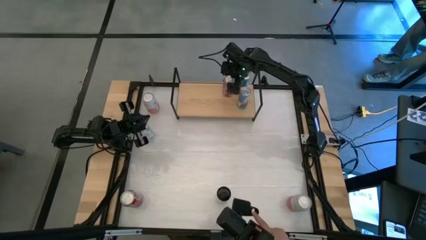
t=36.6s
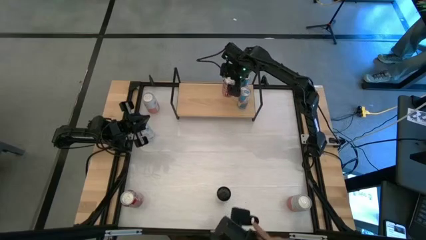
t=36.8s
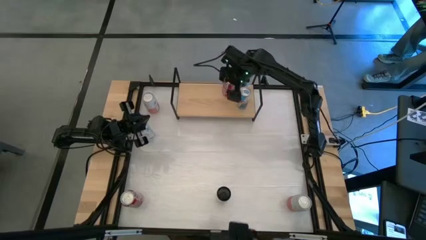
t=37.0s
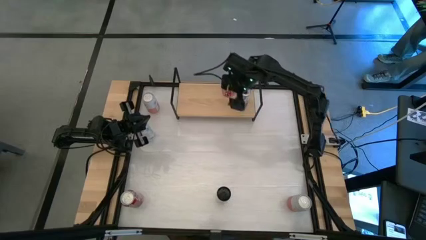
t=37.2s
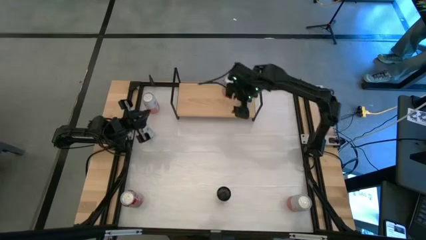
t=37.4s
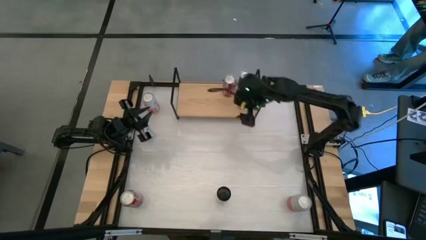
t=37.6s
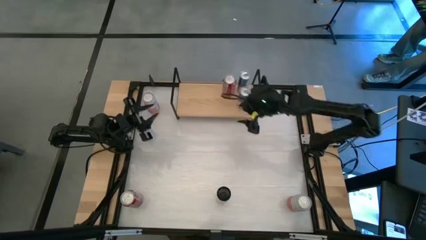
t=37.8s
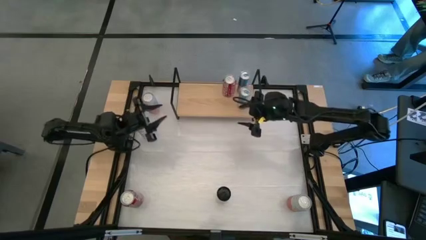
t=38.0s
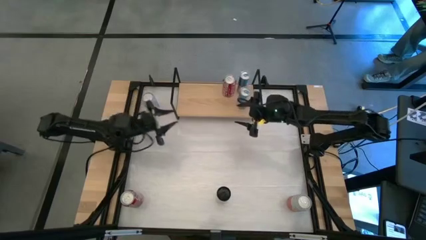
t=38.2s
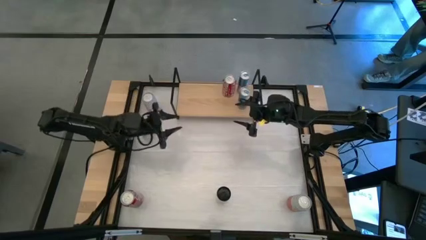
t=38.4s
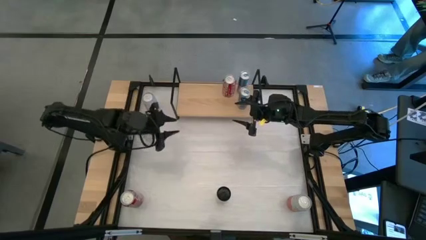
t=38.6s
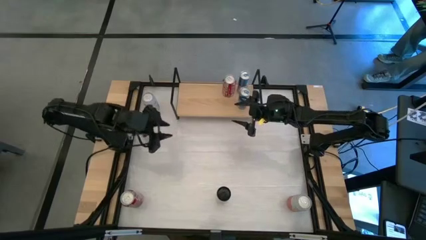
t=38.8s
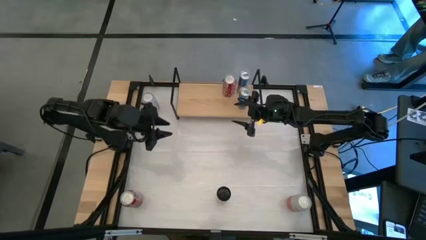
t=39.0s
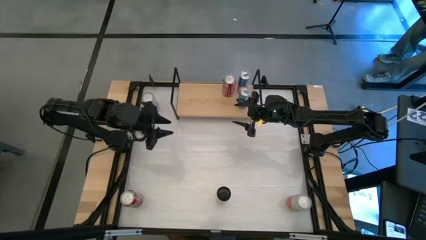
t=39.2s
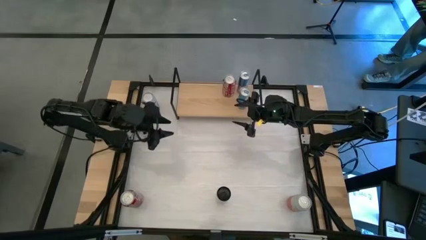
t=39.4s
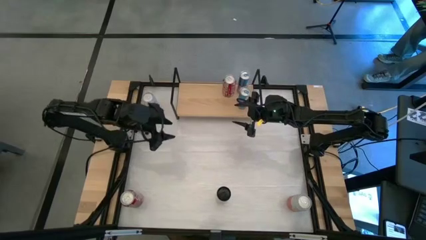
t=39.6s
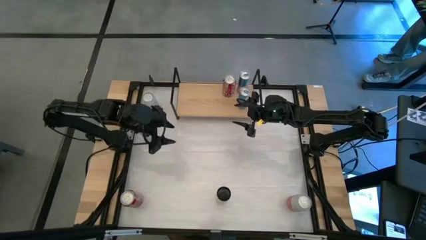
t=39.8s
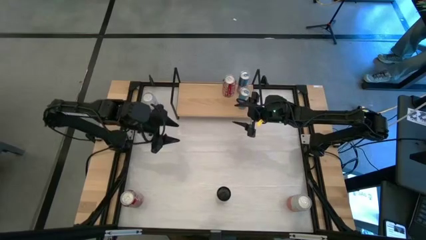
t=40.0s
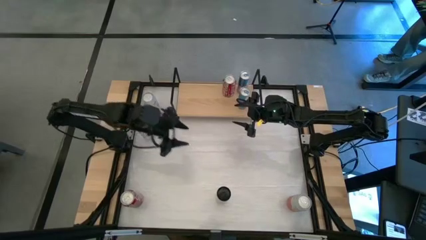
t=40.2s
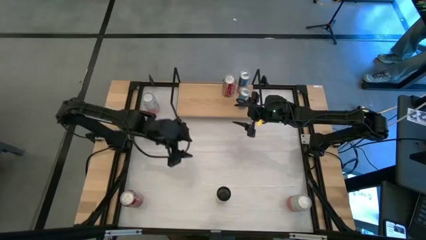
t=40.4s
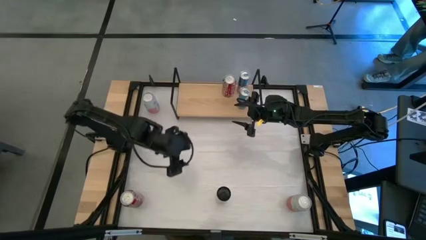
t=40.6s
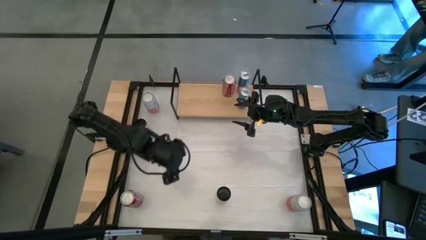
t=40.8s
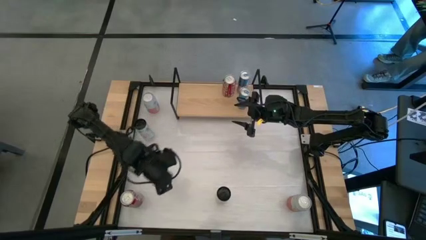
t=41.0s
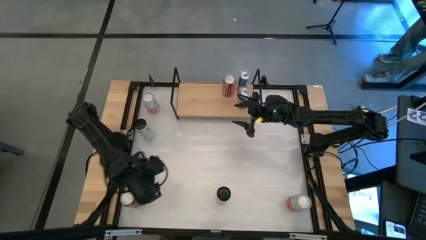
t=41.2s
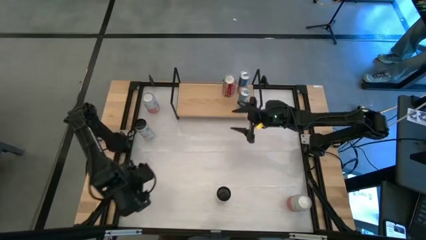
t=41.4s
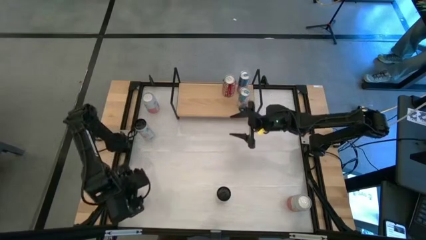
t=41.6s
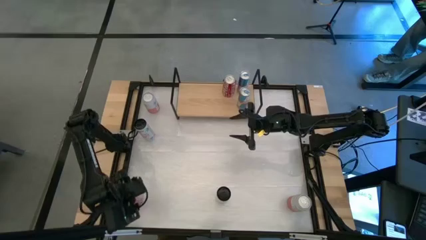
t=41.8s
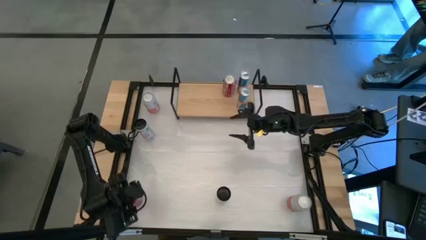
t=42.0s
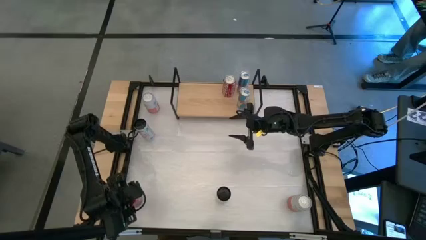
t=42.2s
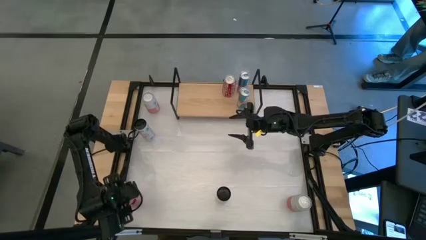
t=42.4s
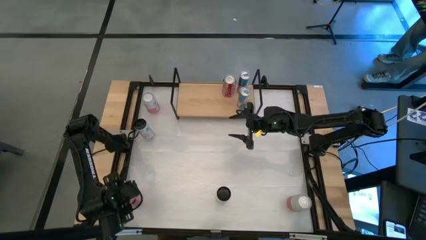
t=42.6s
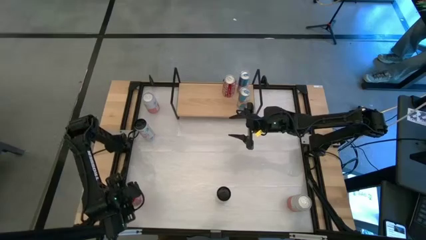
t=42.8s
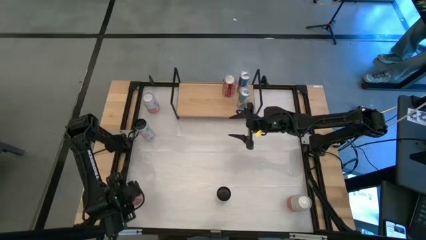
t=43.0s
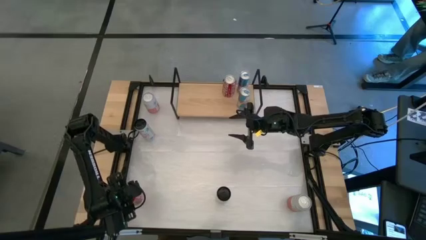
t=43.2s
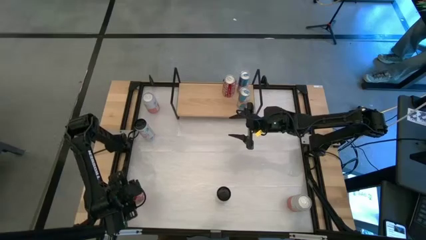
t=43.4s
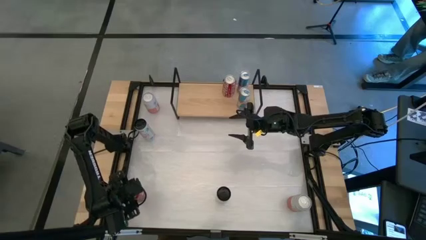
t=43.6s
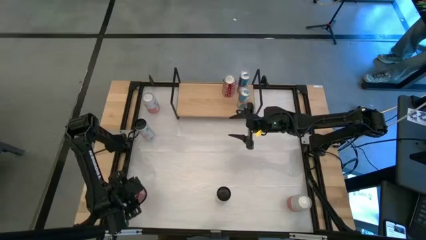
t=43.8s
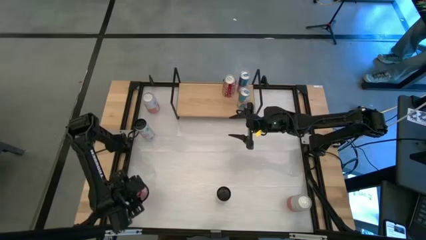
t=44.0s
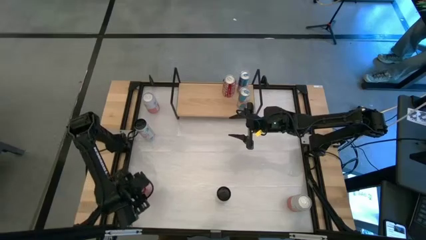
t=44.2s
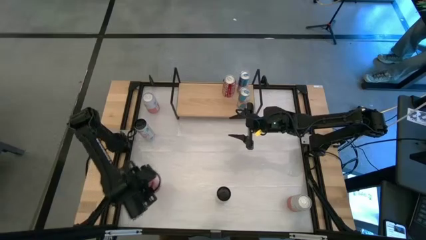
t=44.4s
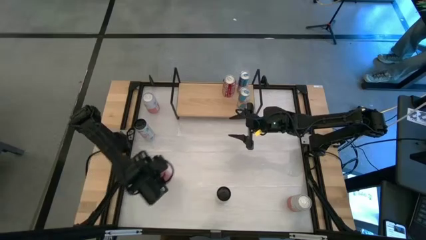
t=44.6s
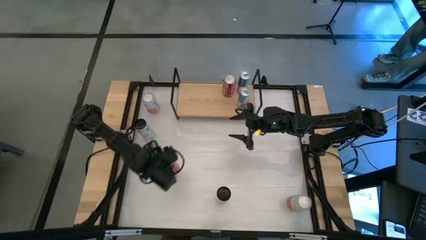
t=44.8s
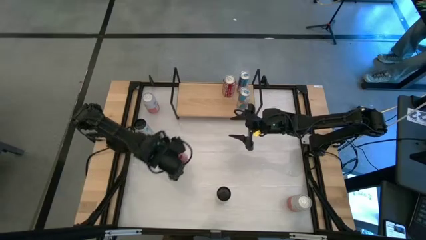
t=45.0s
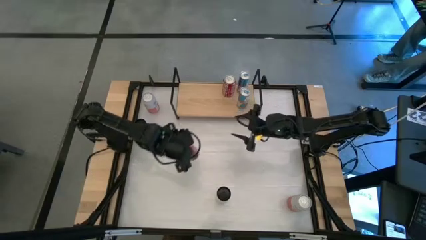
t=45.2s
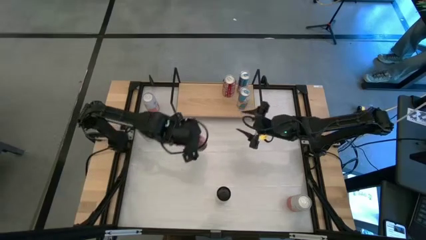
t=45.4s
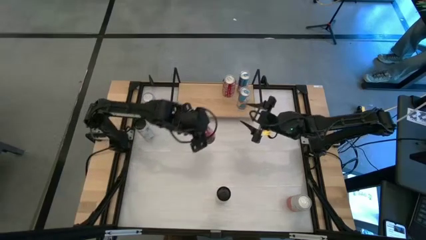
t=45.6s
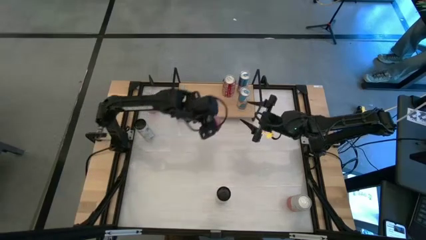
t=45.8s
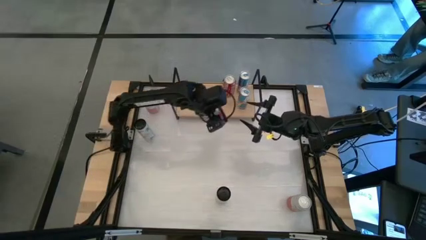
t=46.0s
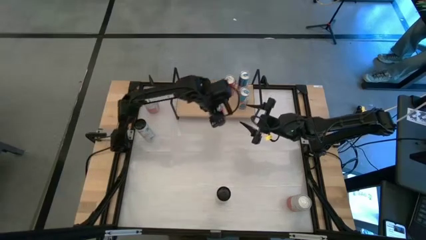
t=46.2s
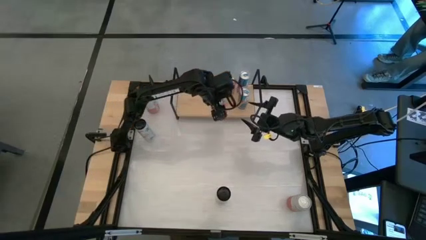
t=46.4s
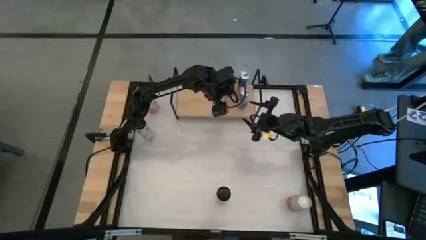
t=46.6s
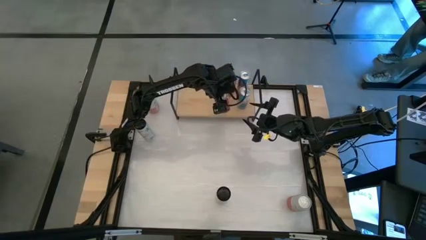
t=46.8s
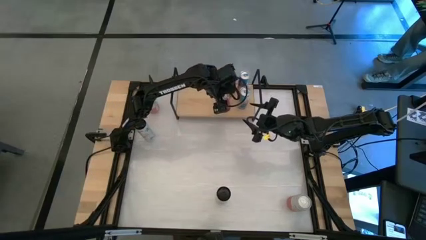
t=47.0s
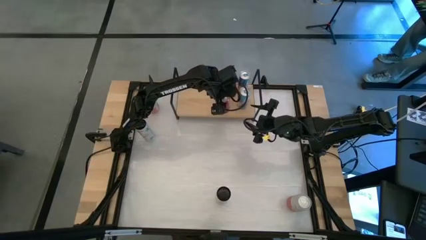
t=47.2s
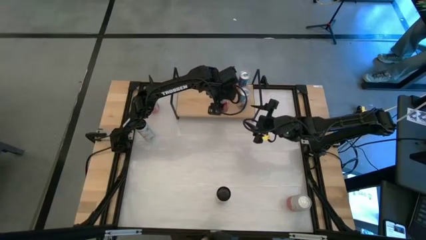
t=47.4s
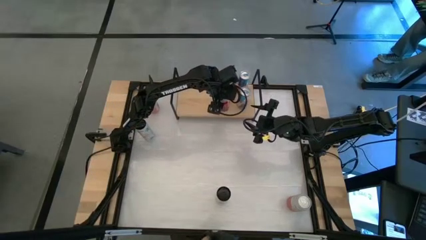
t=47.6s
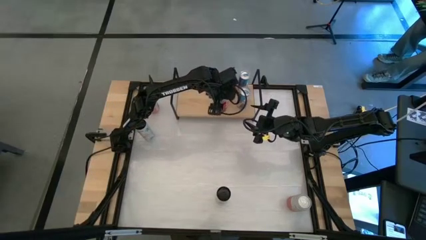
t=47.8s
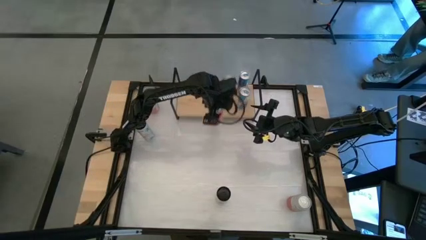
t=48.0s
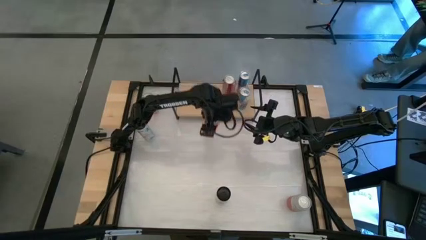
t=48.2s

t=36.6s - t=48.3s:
Task: Place canned beverage on shelf
Put the red soda can on the shelf
